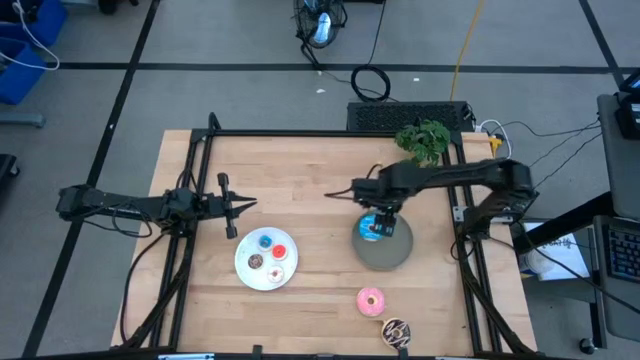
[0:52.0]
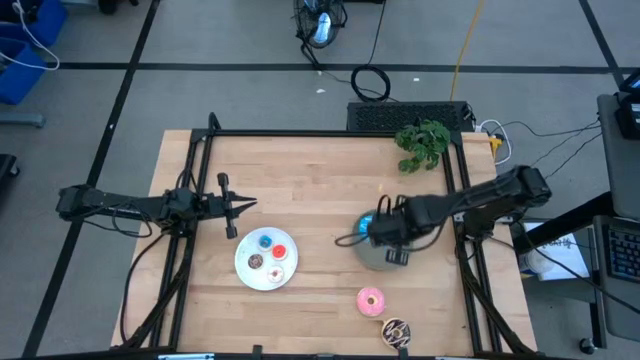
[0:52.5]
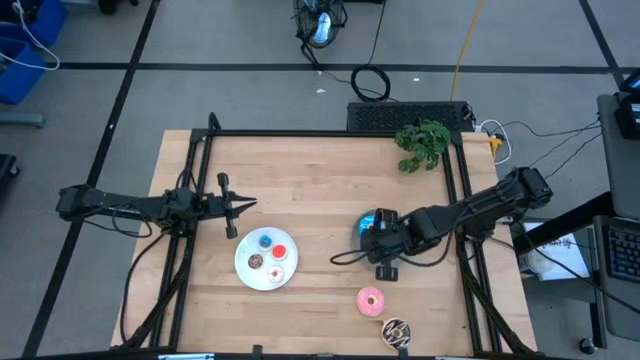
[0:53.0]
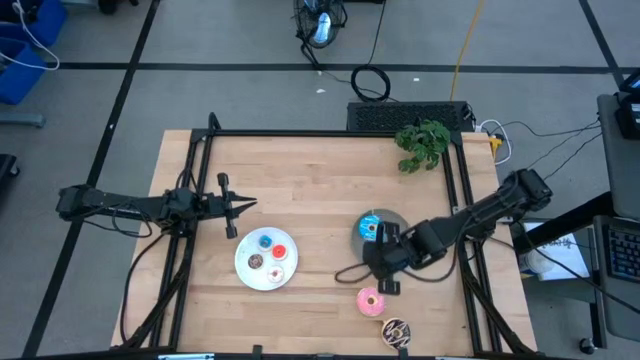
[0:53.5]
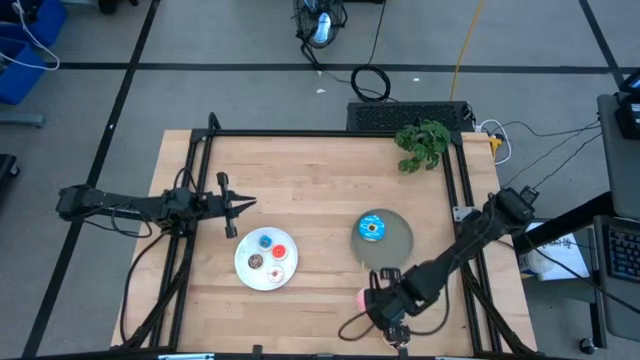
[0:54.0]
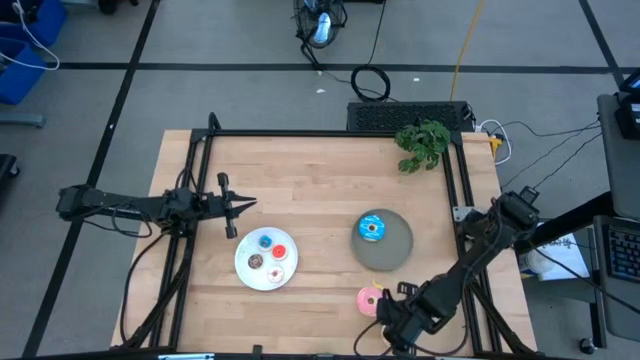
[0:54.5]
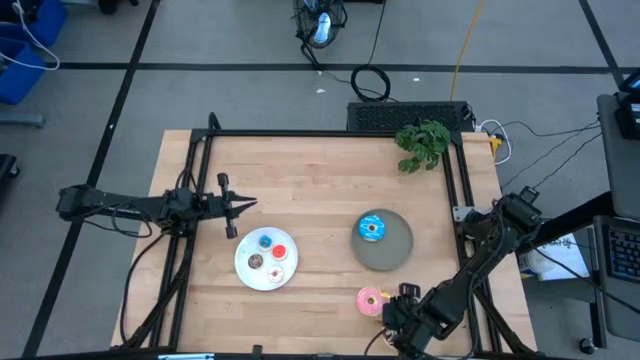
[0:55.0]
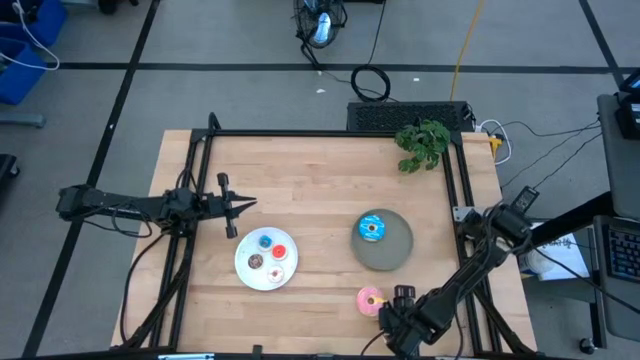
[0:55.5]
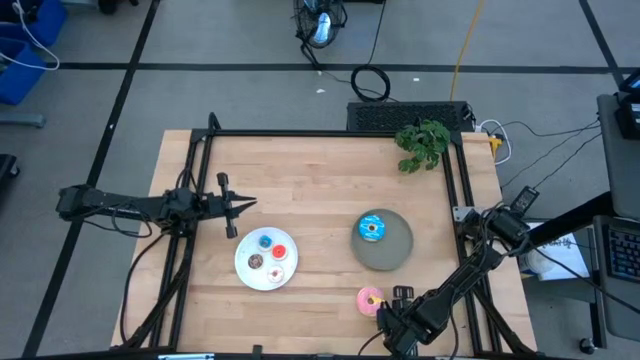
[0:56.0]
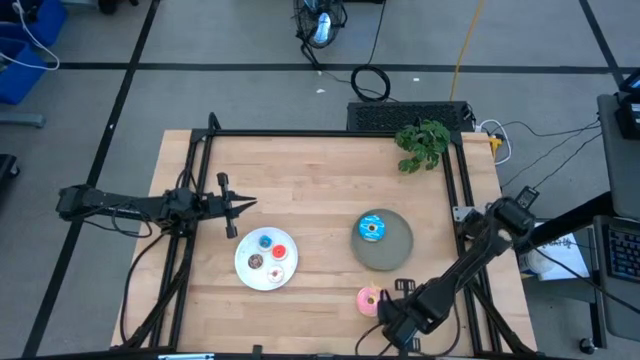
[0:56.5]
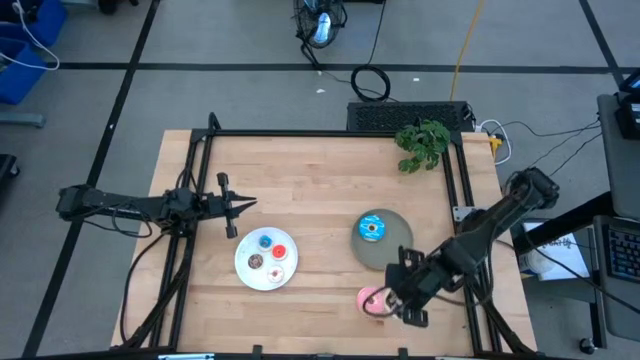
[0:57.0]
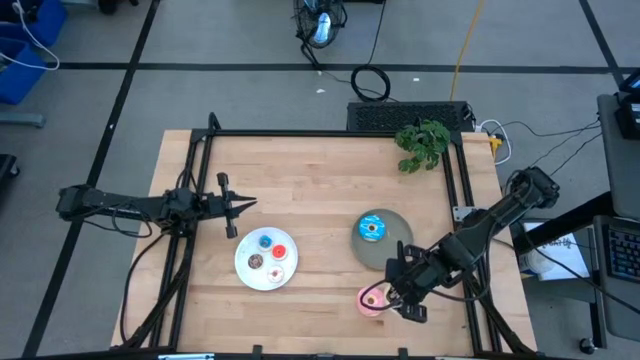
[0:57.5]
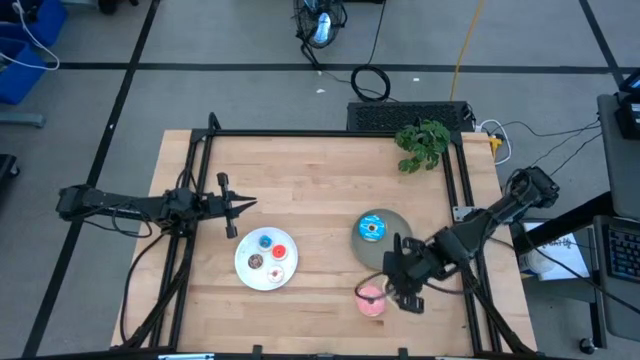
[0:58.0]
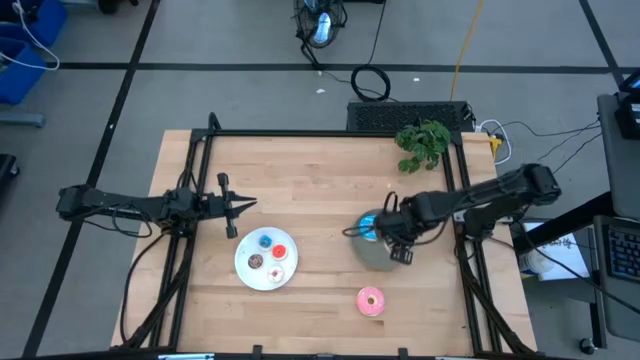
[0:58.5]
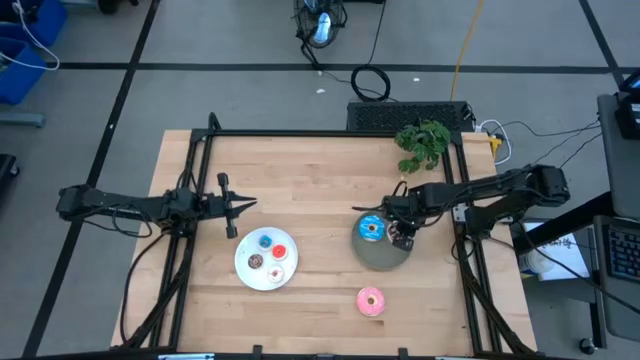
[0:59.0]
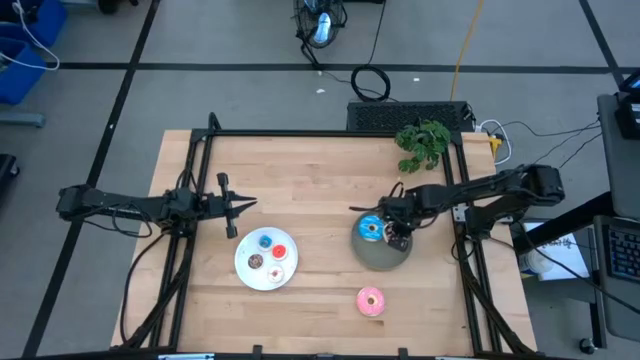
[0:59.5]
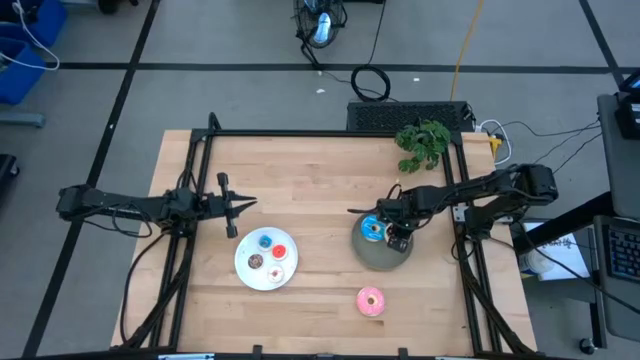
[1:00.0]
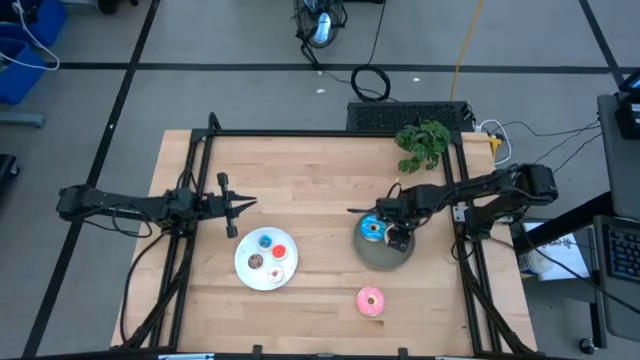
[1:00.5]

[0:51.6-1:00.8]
Task: Pick & Place donuts
Put the big brown donut on the gray plate

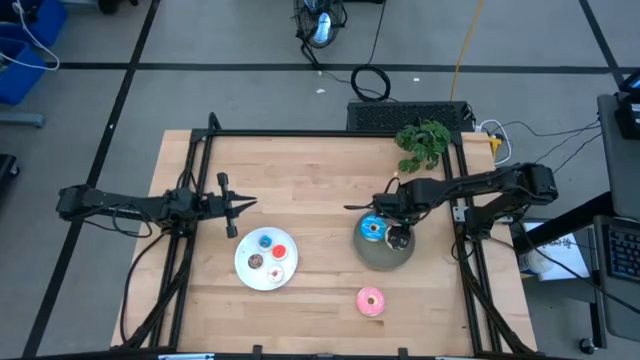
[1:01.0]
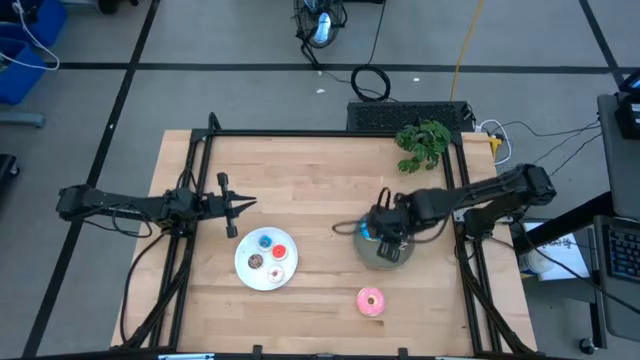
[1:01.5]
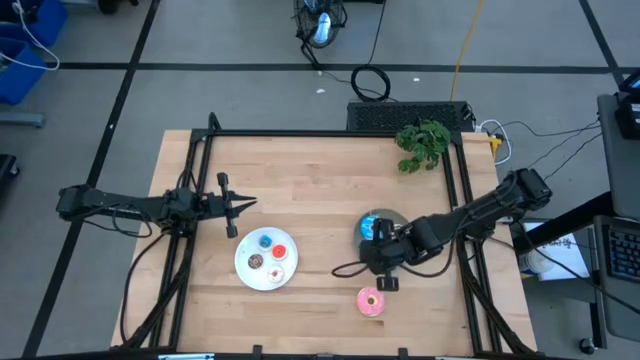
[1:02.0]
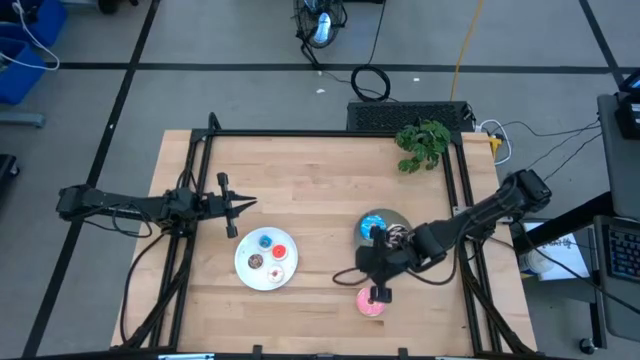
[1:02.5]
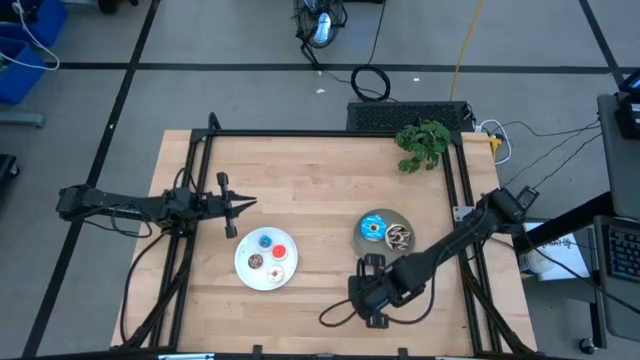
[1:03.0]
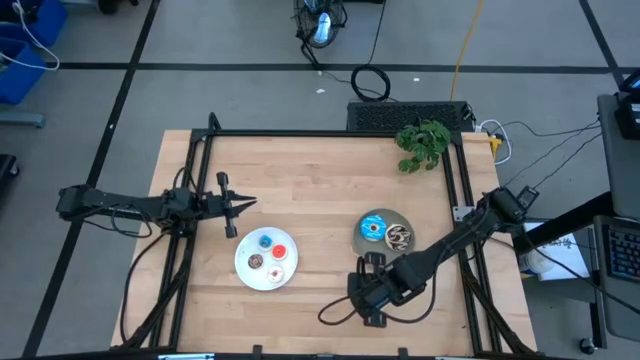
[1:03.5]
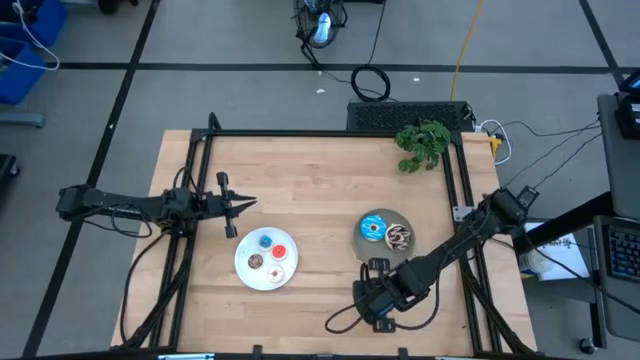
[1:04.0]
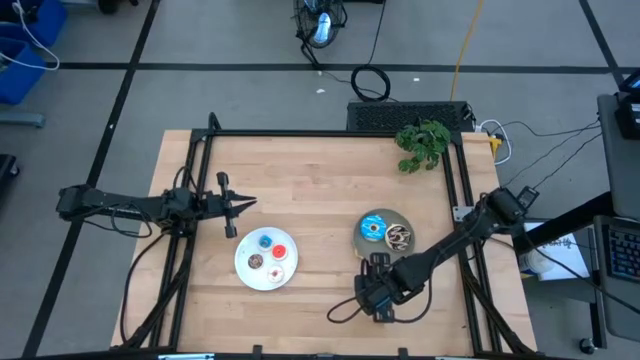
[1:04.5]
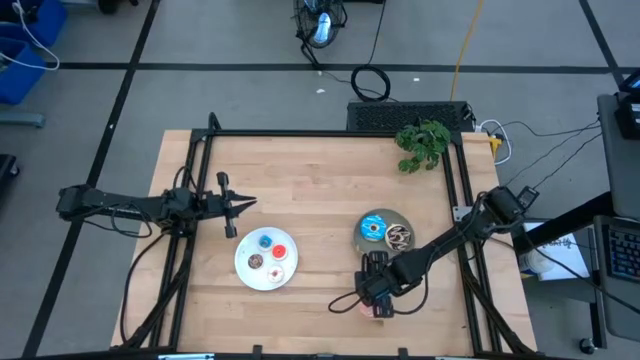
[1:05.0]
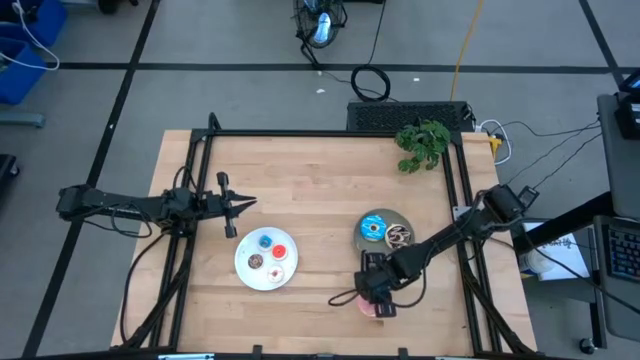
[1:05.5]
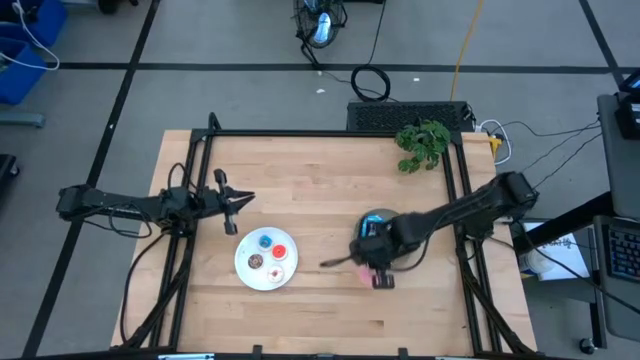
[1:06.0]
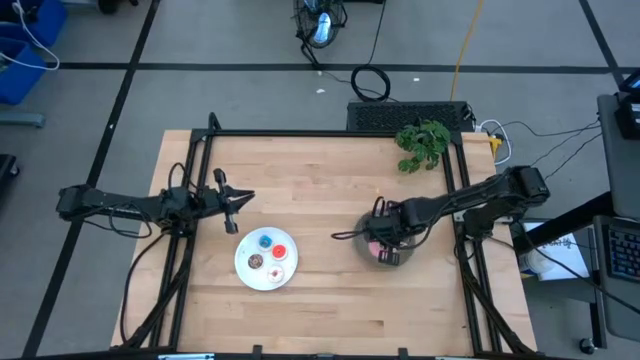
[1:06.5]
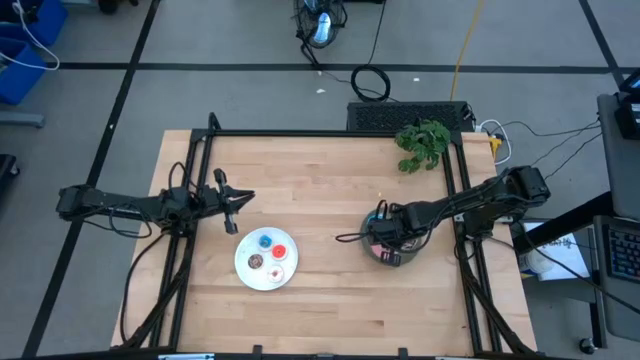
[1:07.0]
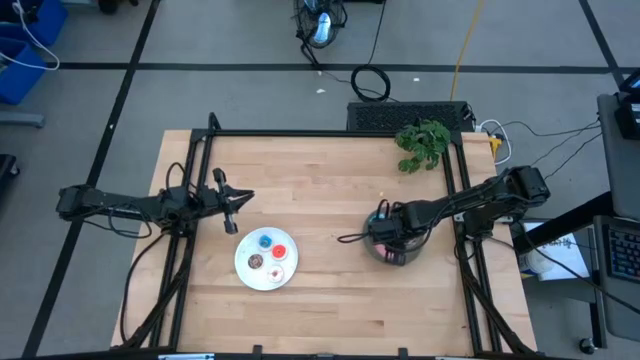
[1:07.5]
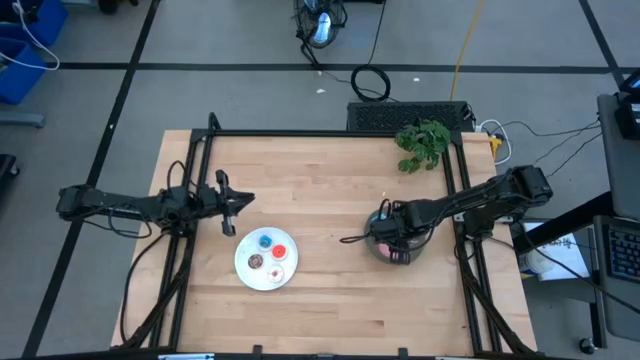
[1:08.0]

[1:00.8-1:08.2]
Put the big pink donut on the gray plate

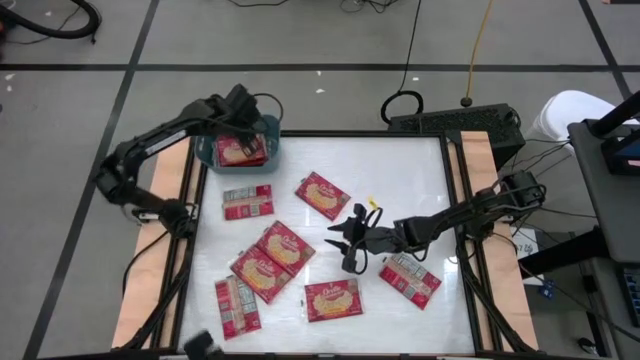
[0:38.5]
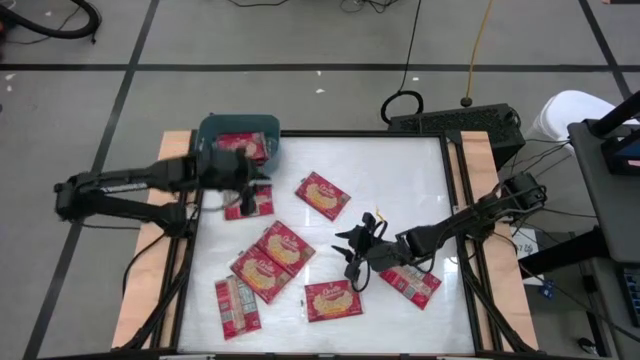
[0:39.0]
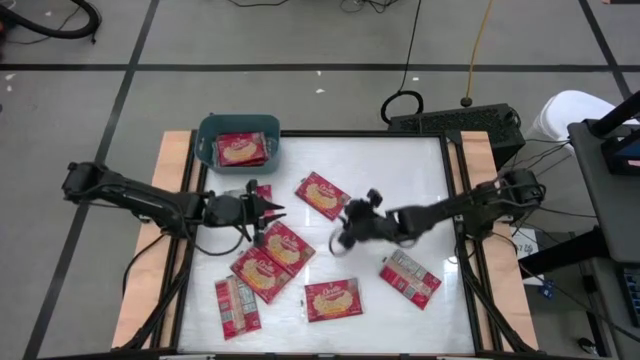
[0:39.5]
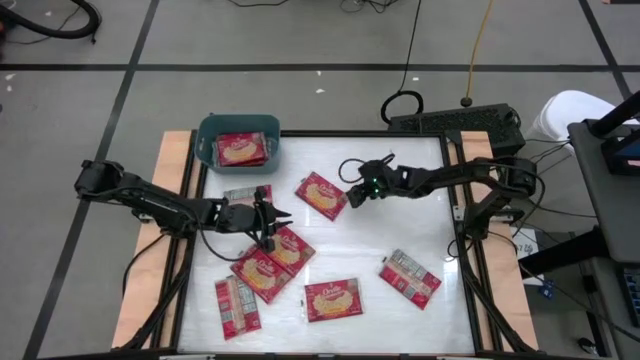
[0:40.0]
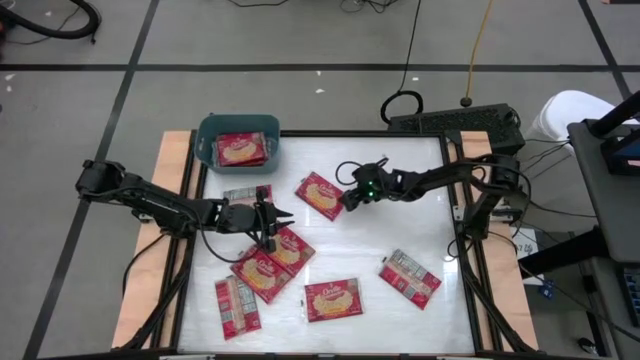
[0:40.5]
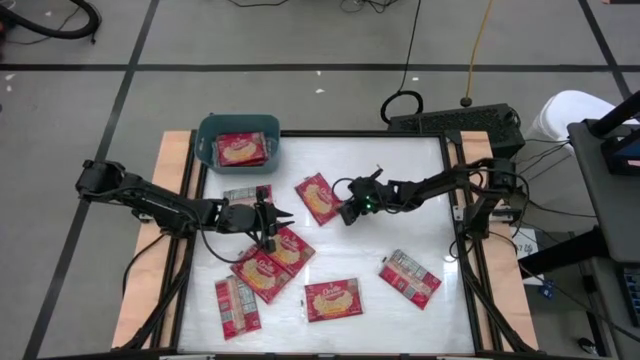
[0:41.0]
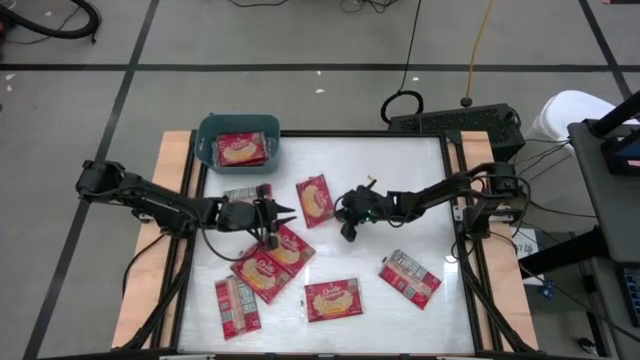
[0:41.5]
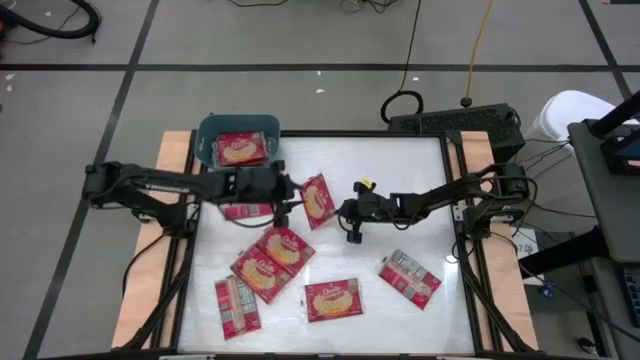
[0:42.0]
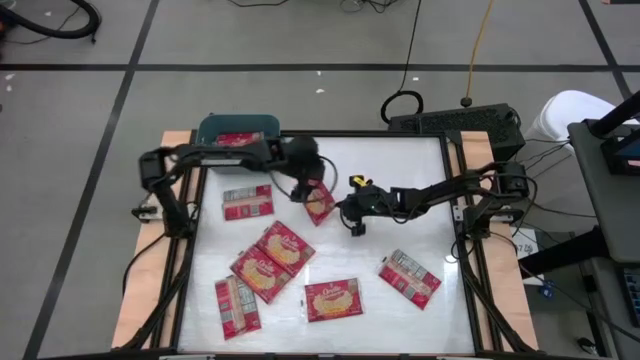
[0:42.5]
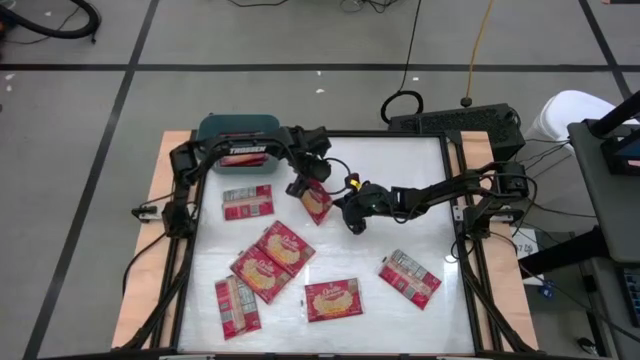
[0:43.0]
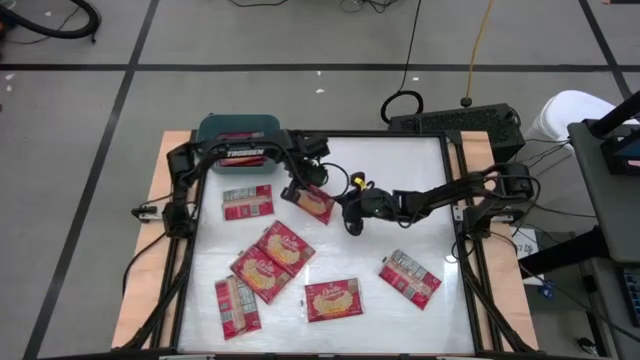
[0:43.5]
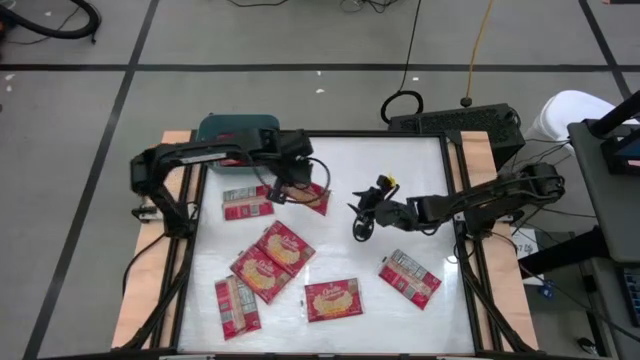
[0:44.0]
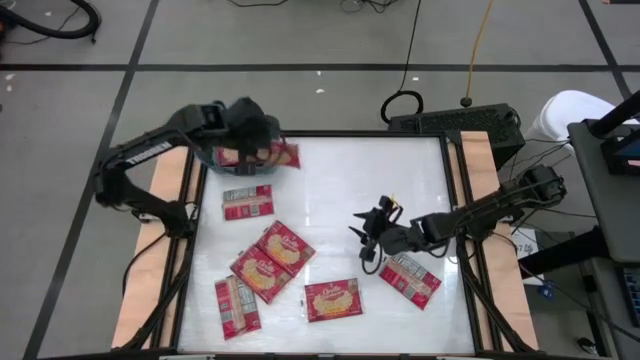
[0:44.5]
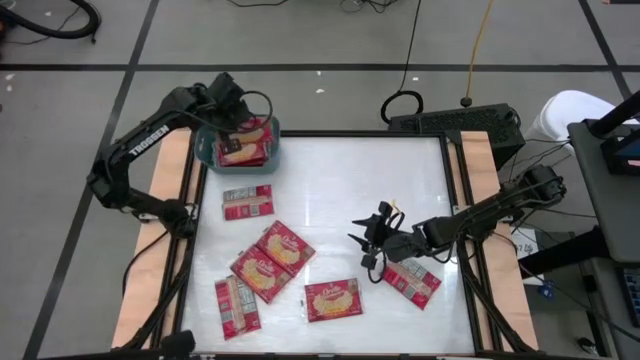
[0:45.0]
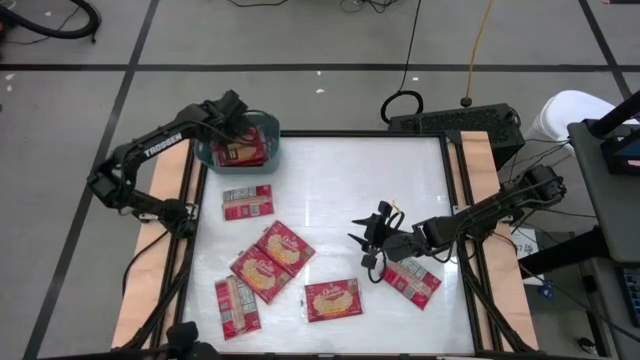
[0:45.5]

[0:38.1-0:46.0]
Task: Sort popcorn bags into baskets
Put the red popcorn bag into the blue bin
